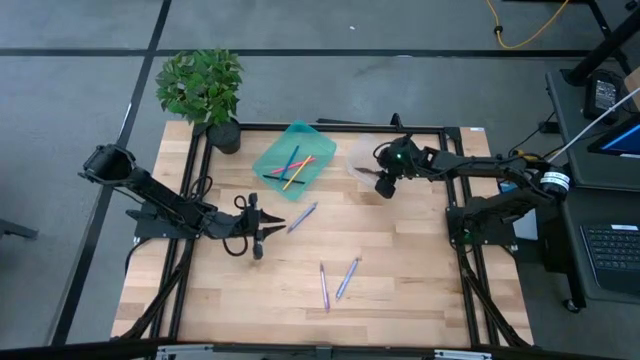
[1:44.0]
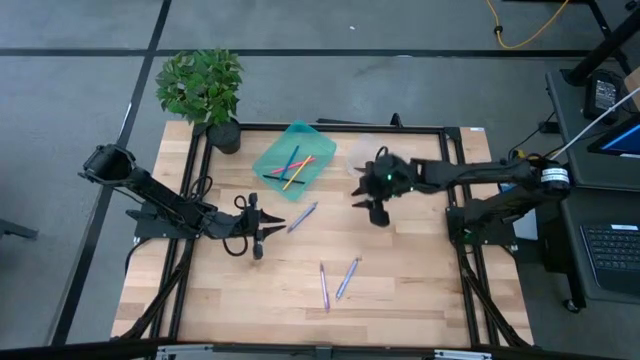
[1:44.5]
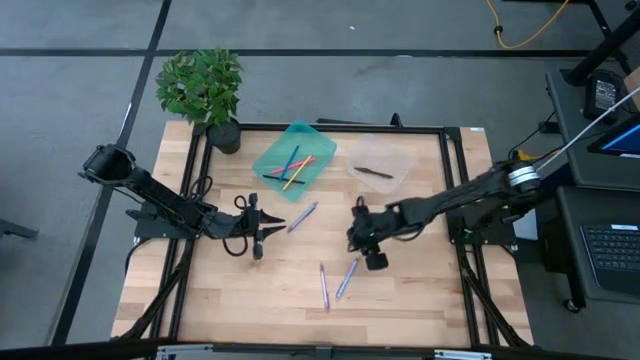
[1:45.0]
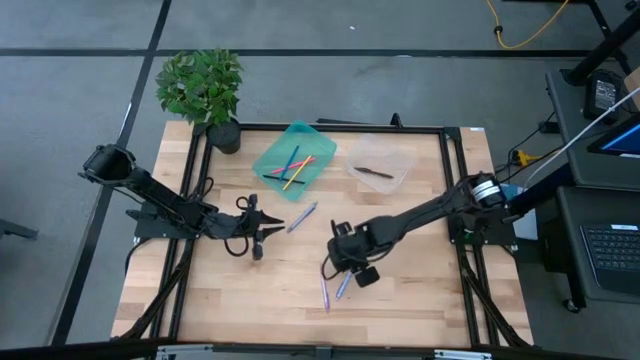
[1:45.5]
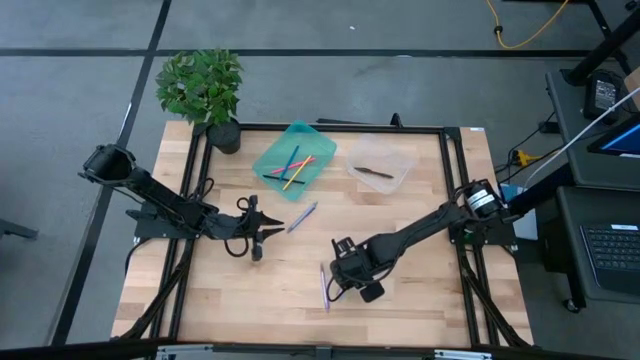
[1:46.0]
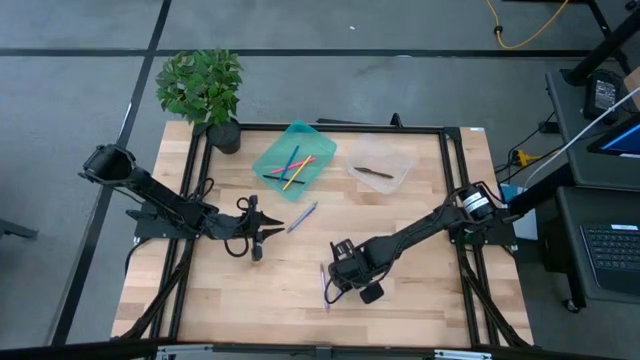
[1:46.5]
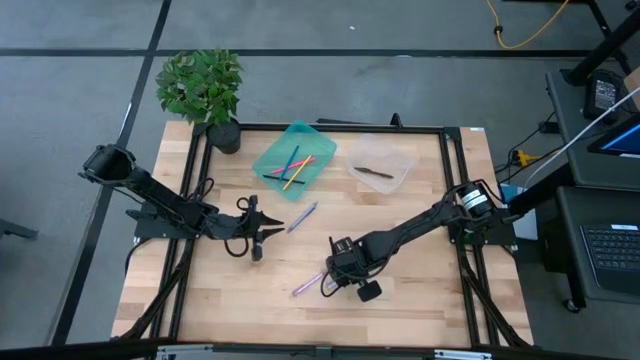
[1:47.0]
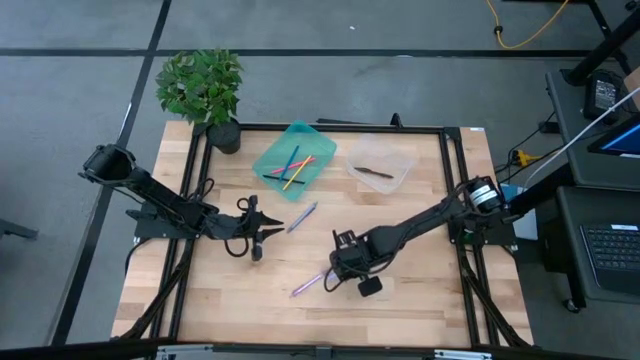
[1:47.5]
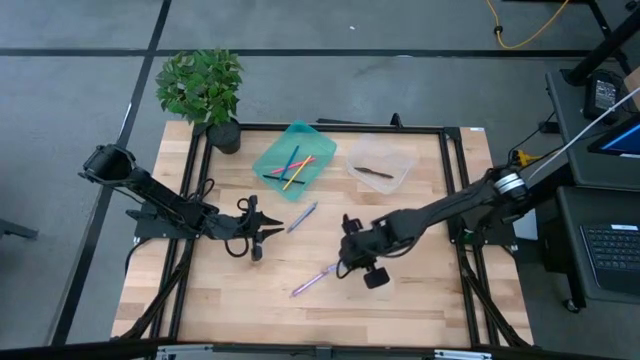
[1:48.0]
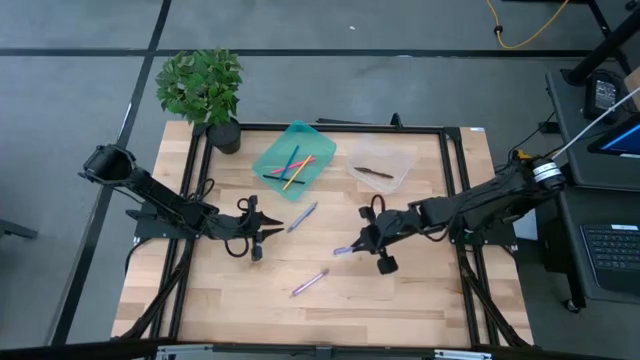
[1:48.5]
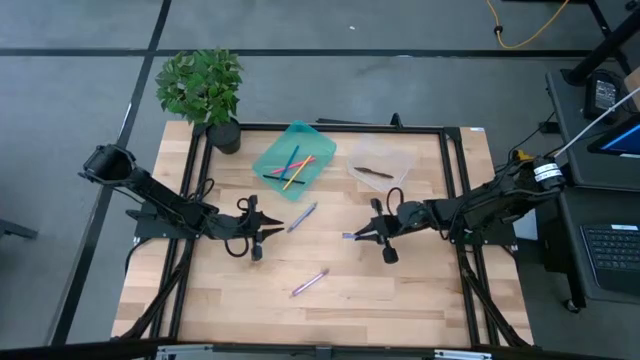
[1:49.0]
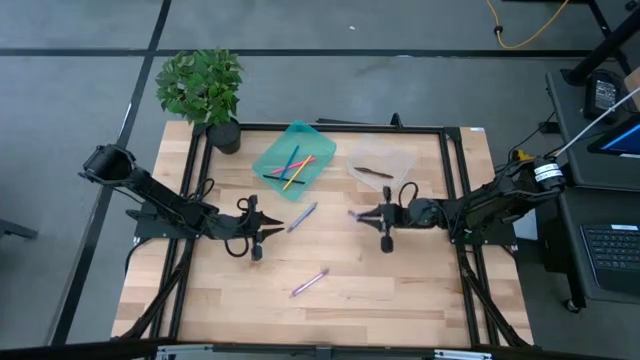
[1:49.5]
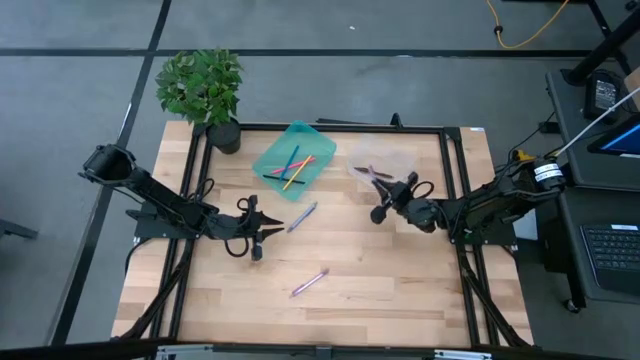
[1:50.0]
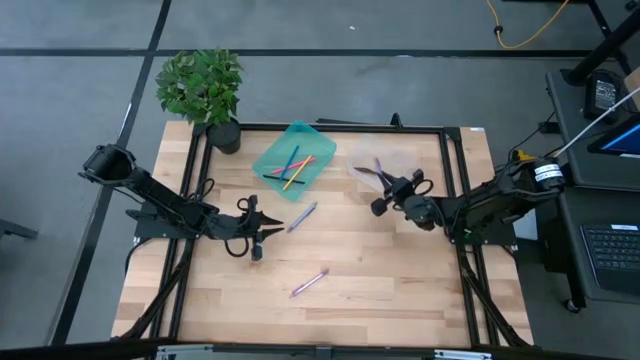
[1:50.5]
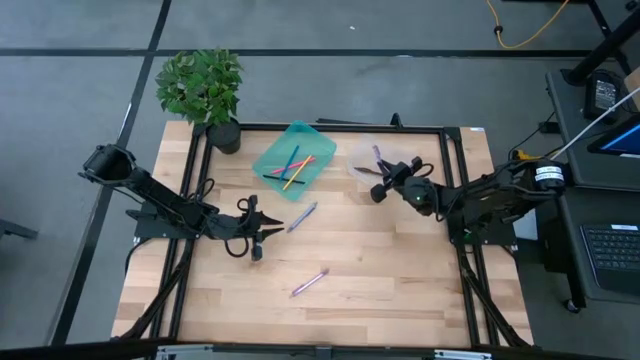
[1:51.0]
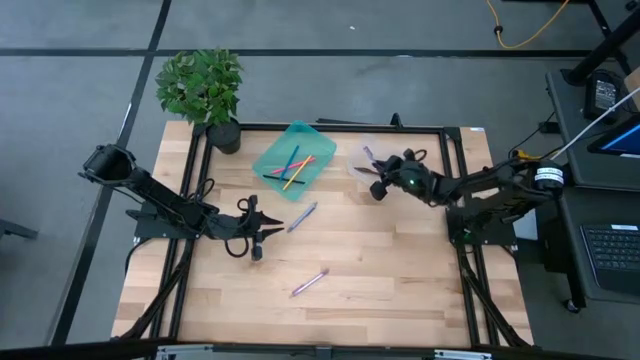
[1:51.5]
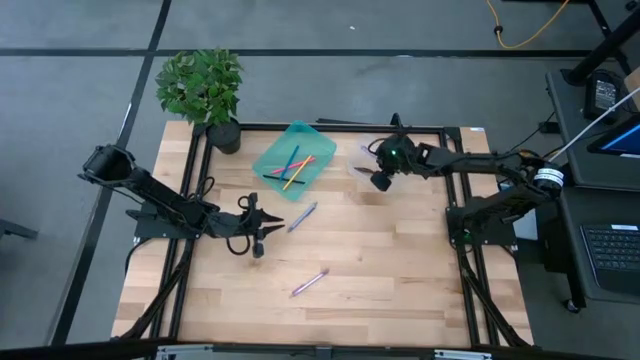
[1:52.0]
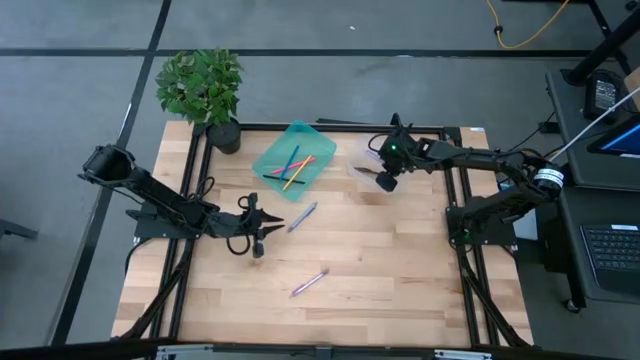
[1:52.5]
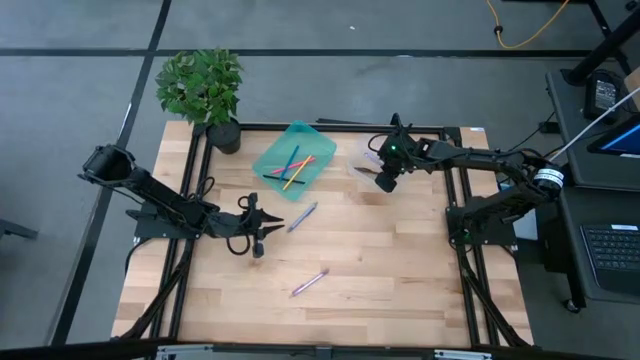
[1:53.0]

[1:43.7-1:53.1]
Task: Sort pens & pencils
Put the right purple pen into the transparent bin

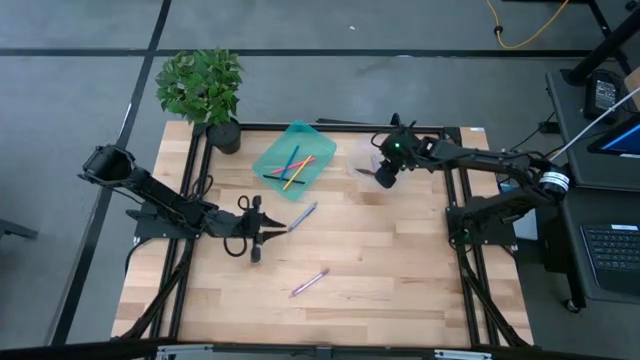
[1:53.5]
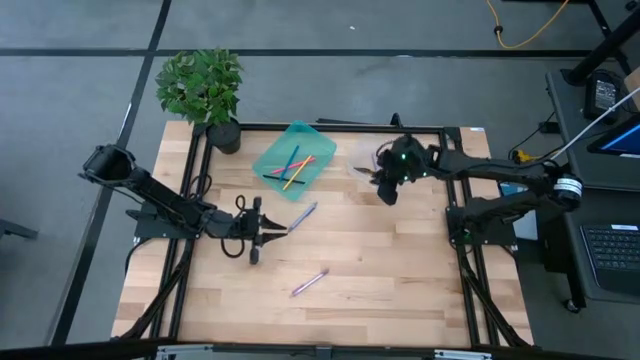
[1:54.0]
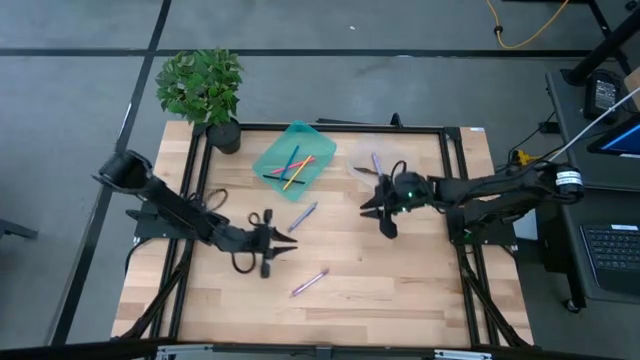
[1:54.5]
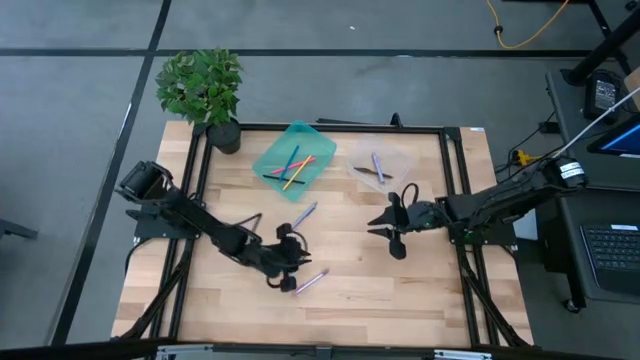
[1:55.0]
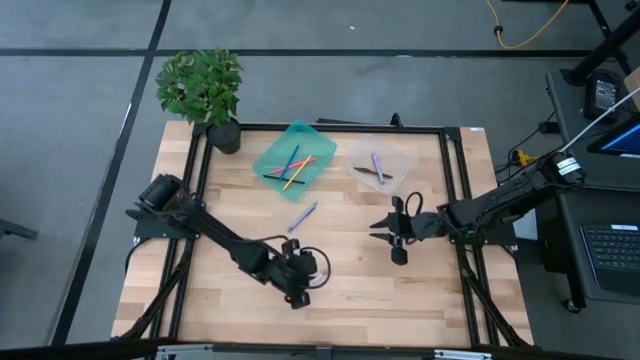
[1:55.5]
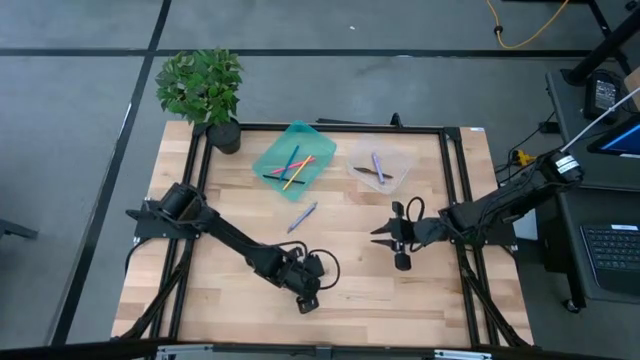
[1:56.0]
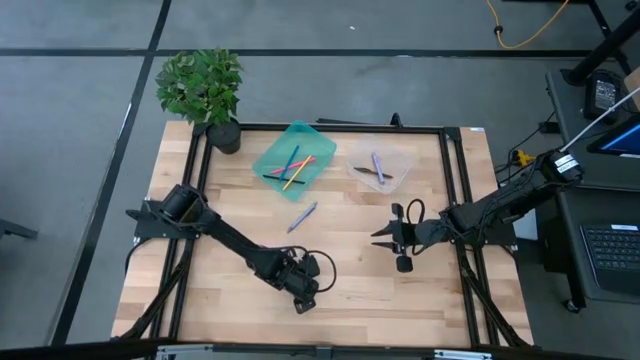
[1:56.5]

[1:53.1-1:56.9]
Put the purple pen into the transparent bin

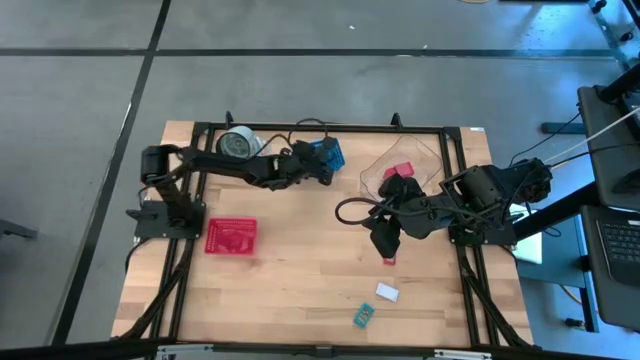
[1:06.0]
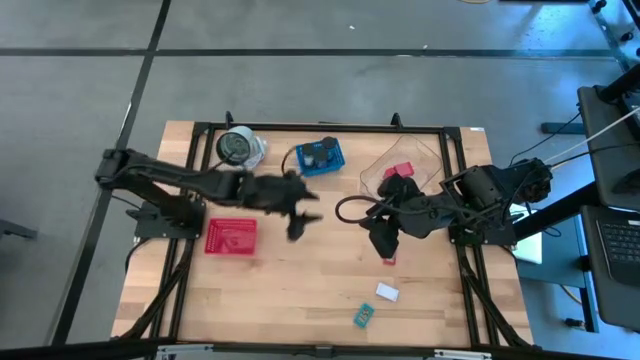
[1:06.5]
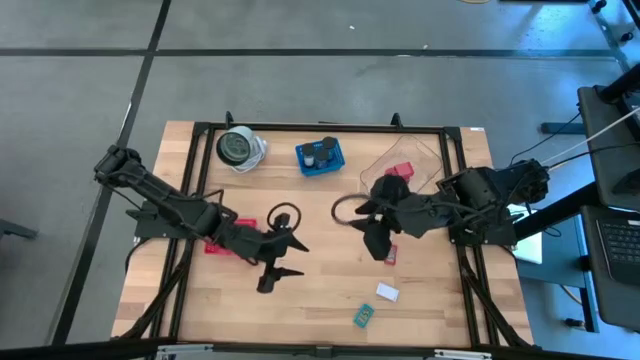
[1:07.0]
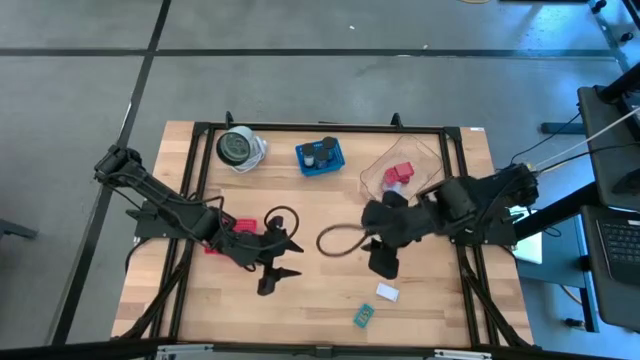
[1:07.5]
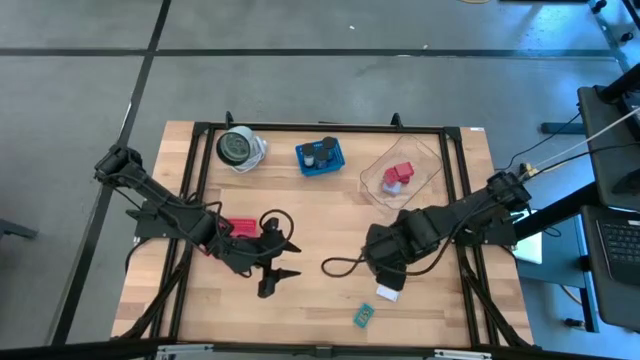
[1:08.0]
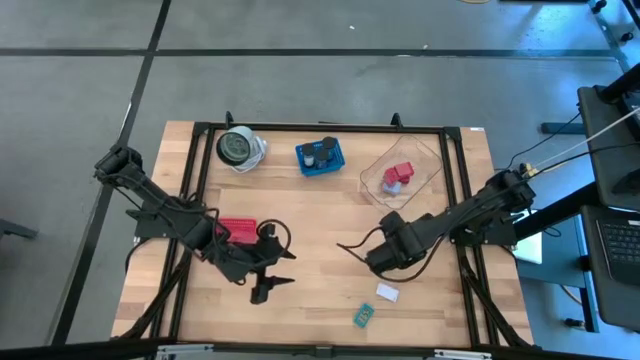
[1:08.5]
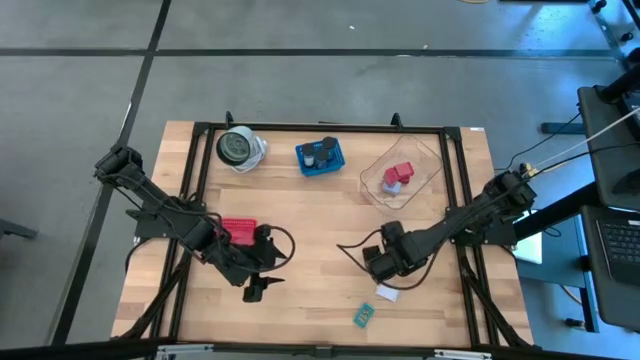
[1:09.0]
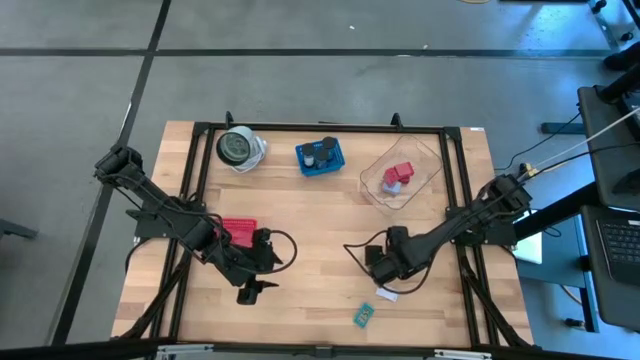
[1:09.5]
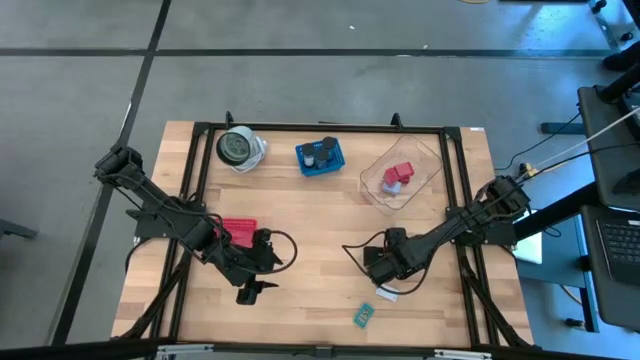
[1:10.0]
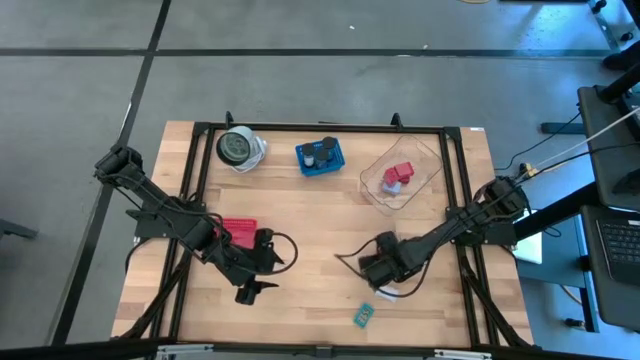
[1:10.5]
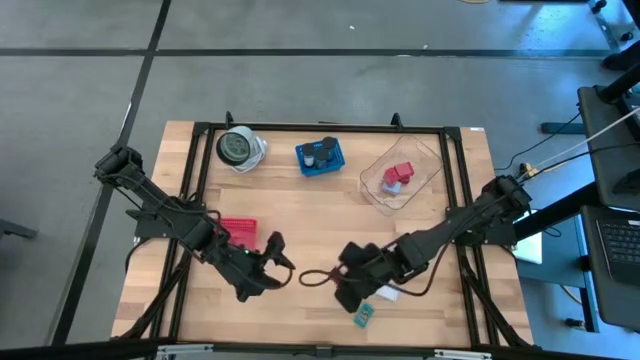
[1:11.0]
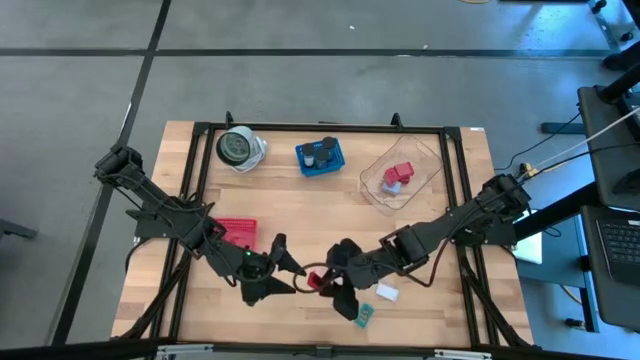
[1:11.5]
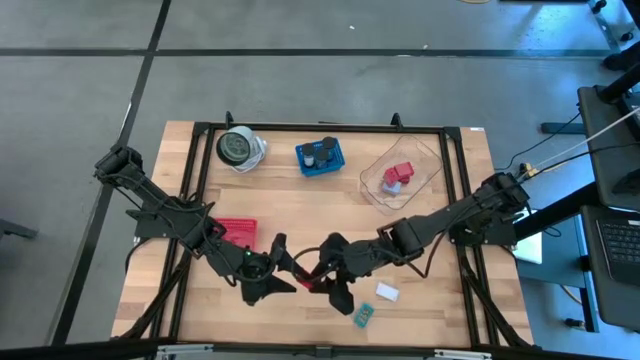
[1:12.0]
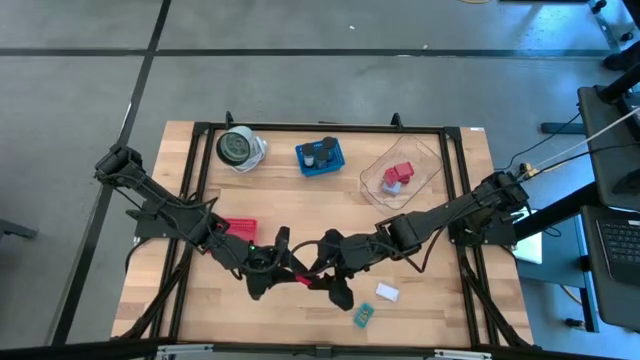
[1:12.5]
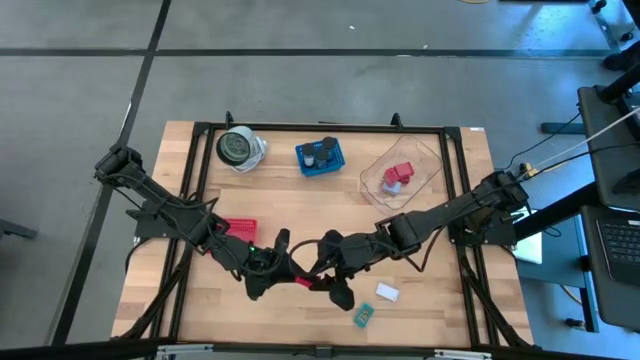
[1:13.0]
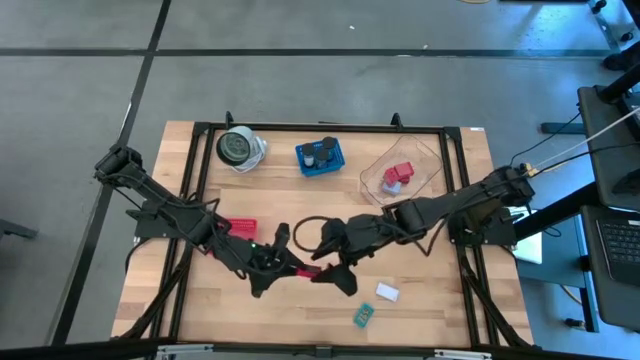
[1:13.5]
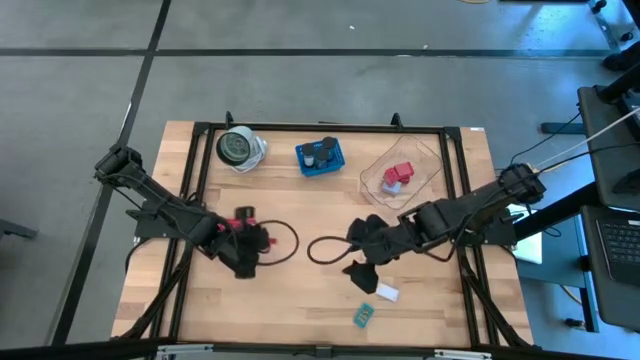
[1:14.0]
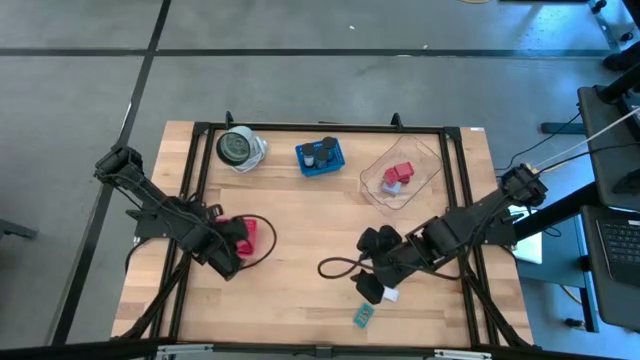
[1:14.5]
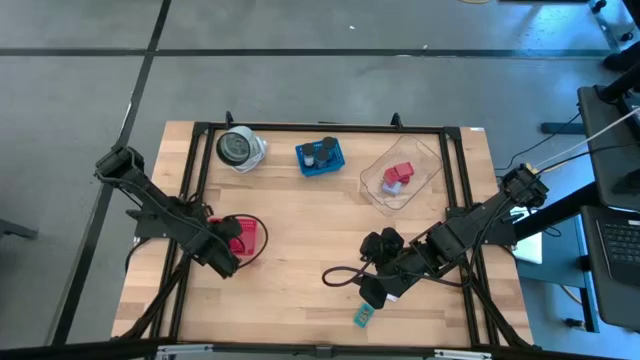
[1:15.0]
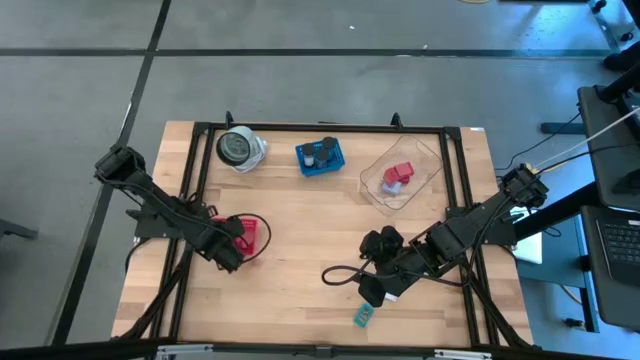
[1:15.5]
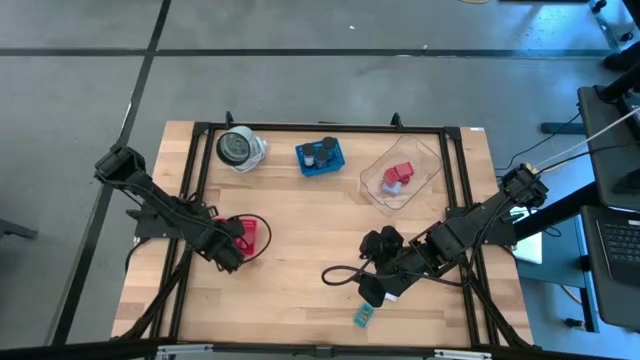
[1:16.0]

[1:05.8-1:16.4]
Task: Pick & Place Office items
Put the red digital clock into the red basket
